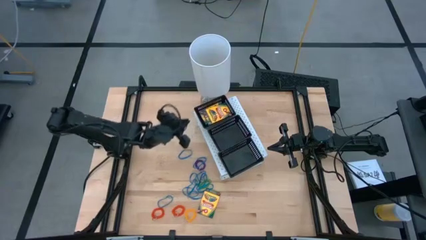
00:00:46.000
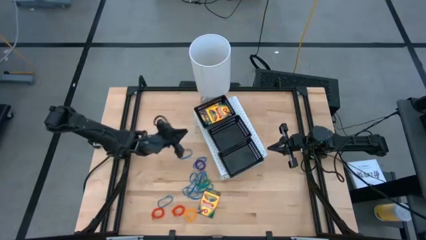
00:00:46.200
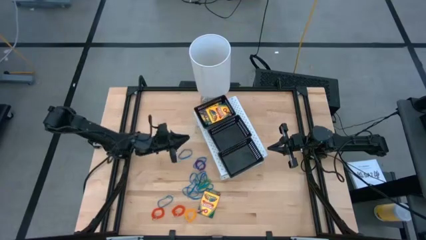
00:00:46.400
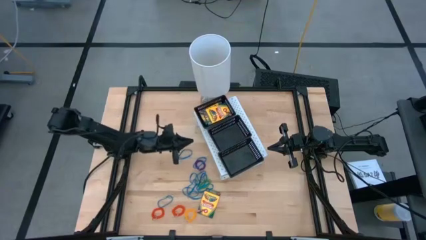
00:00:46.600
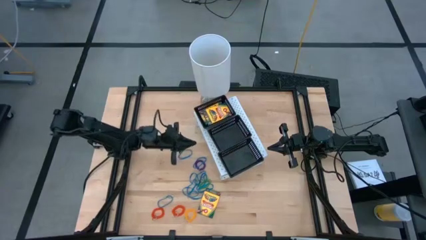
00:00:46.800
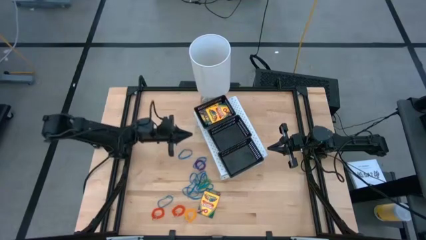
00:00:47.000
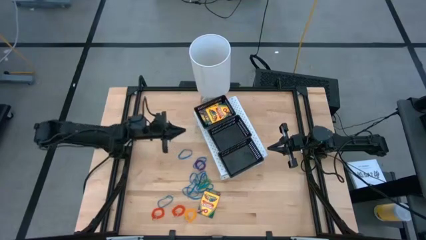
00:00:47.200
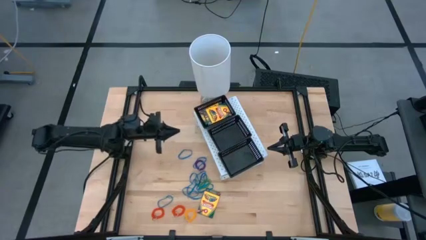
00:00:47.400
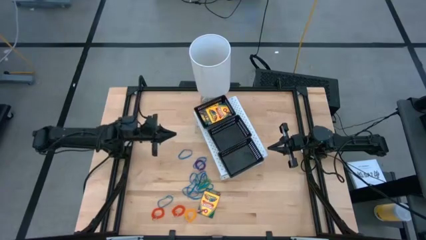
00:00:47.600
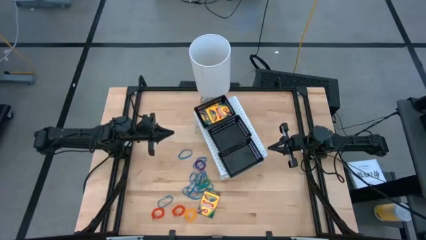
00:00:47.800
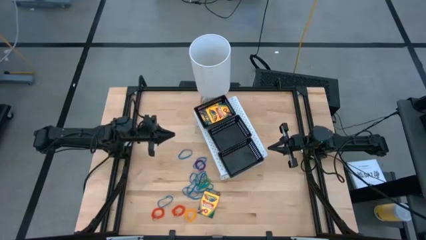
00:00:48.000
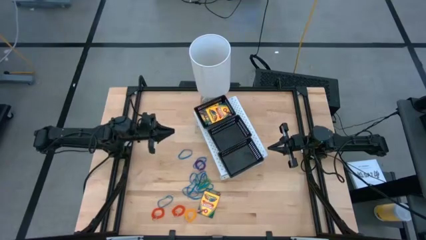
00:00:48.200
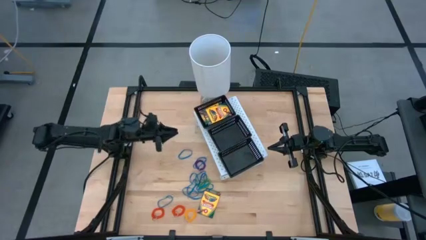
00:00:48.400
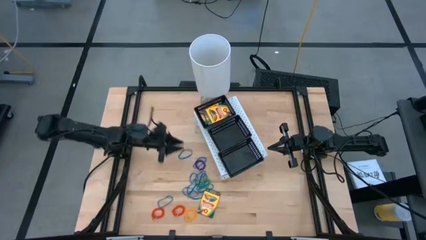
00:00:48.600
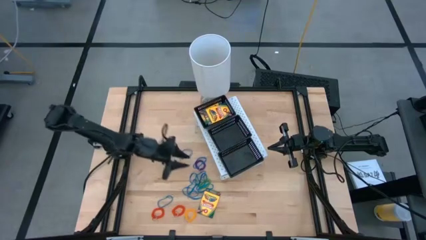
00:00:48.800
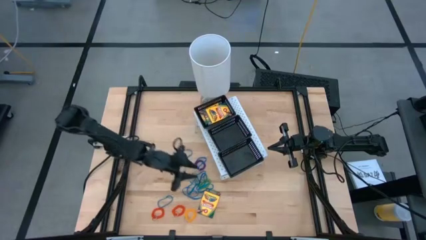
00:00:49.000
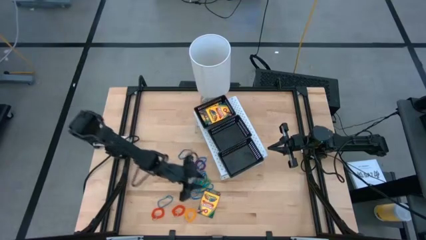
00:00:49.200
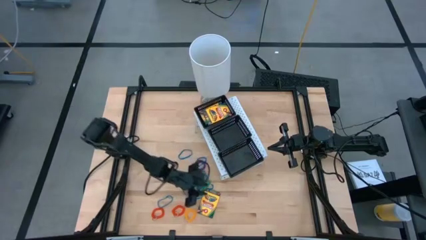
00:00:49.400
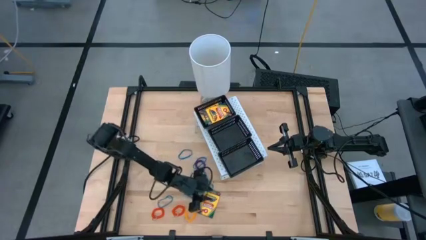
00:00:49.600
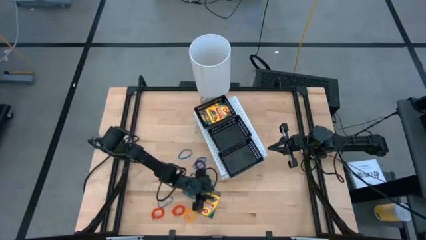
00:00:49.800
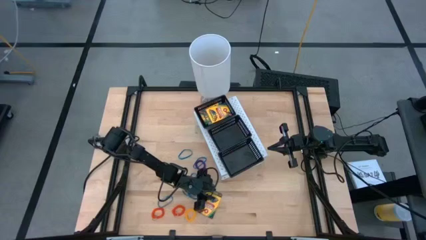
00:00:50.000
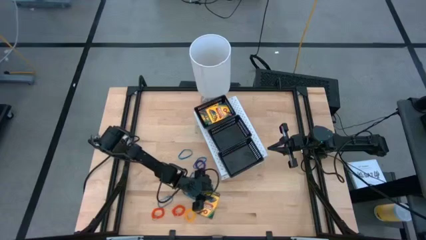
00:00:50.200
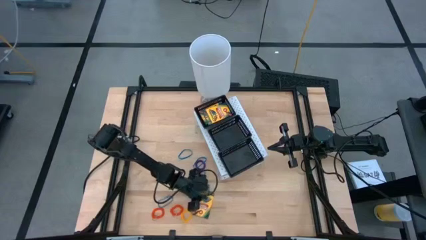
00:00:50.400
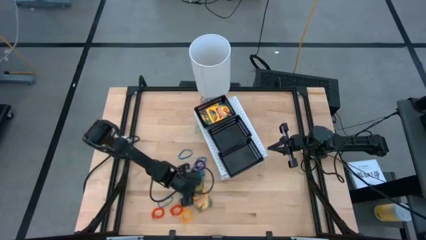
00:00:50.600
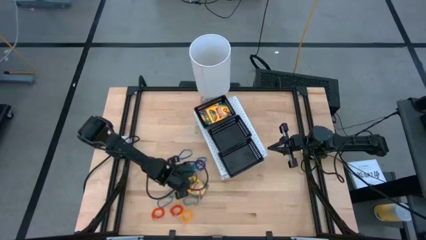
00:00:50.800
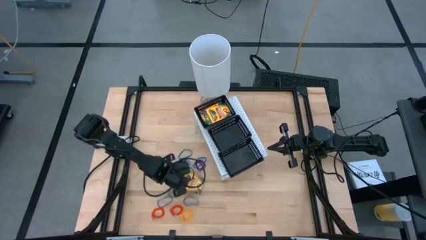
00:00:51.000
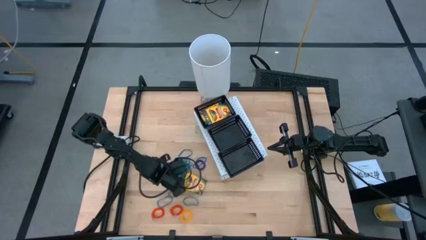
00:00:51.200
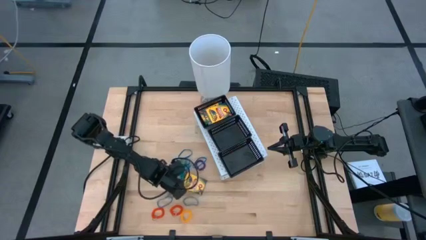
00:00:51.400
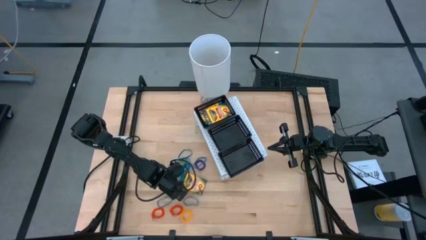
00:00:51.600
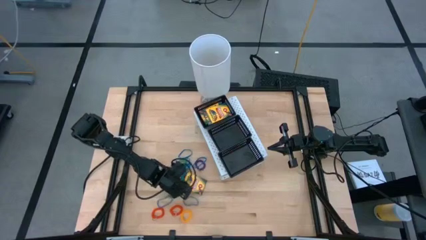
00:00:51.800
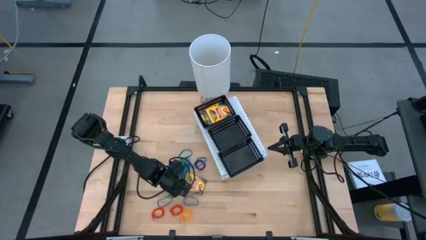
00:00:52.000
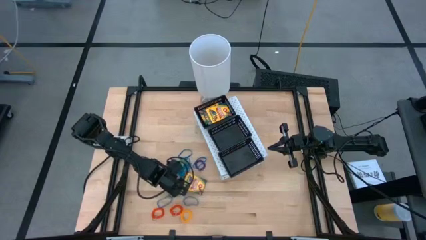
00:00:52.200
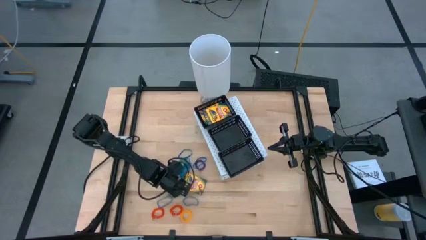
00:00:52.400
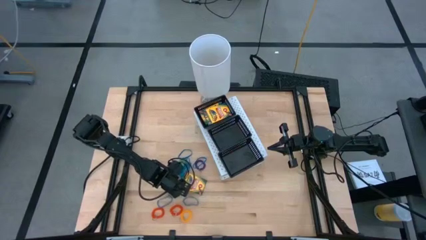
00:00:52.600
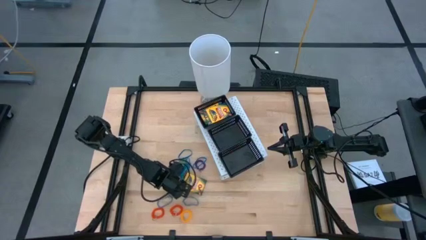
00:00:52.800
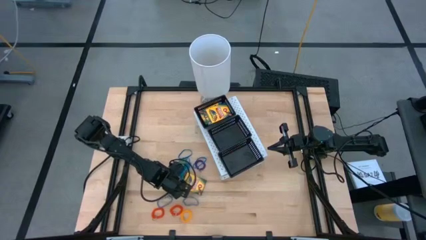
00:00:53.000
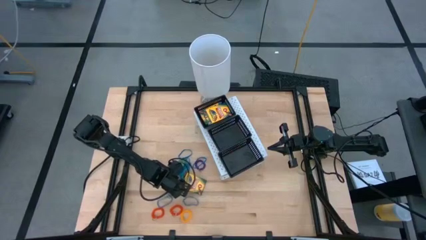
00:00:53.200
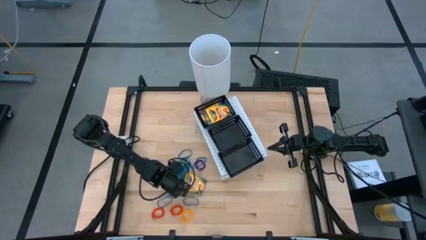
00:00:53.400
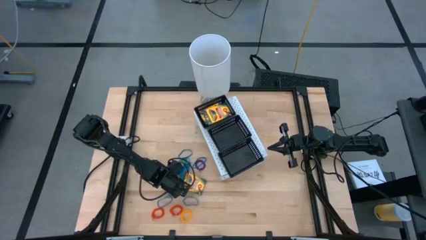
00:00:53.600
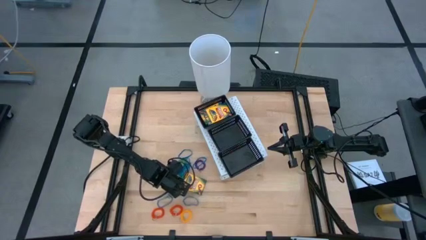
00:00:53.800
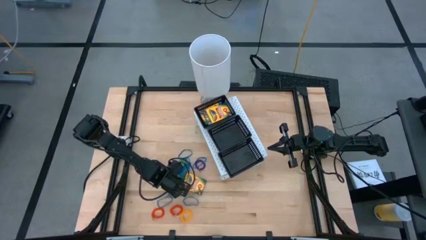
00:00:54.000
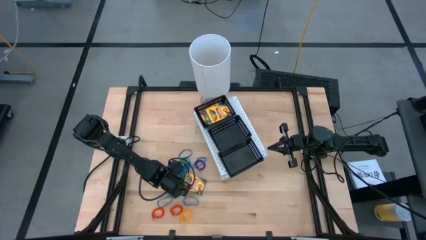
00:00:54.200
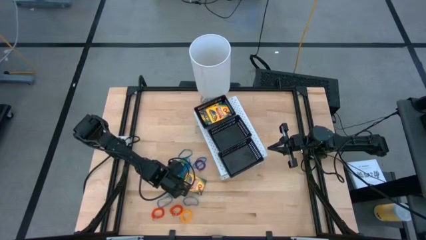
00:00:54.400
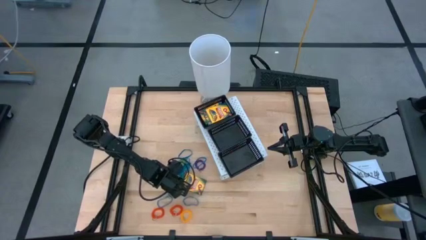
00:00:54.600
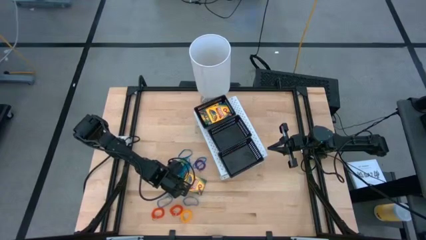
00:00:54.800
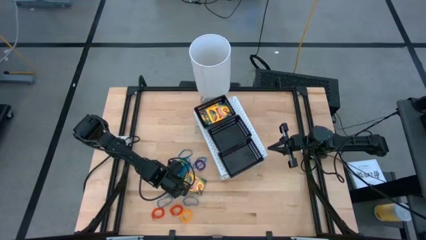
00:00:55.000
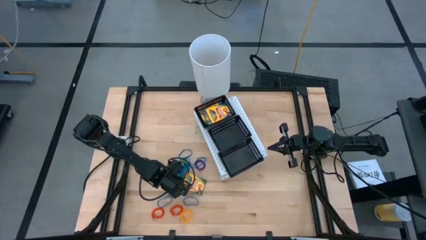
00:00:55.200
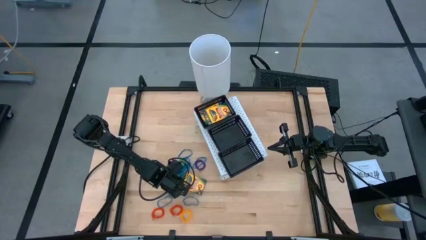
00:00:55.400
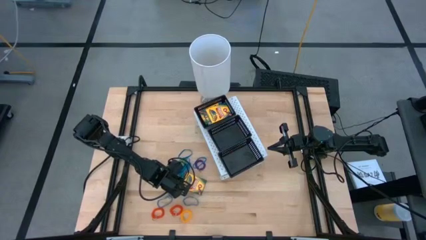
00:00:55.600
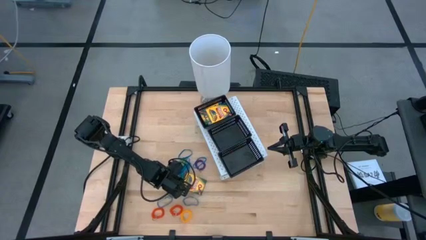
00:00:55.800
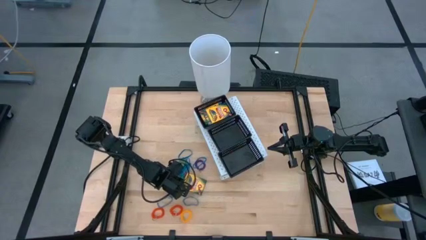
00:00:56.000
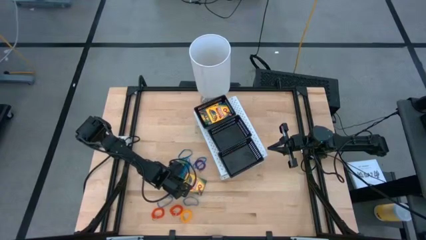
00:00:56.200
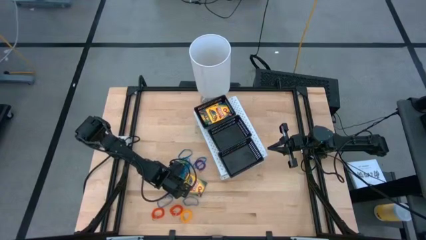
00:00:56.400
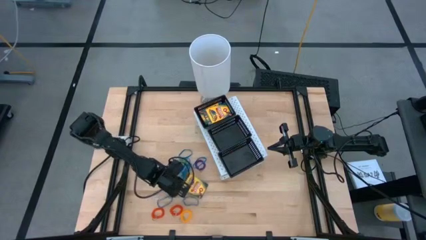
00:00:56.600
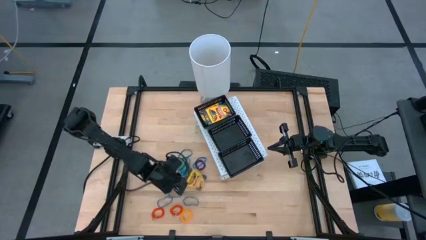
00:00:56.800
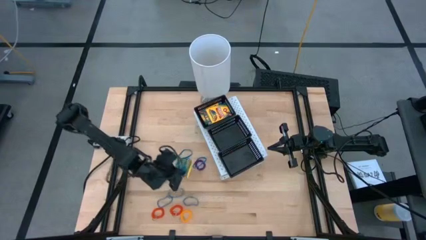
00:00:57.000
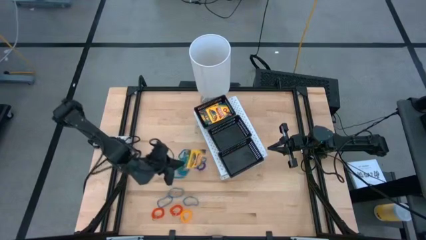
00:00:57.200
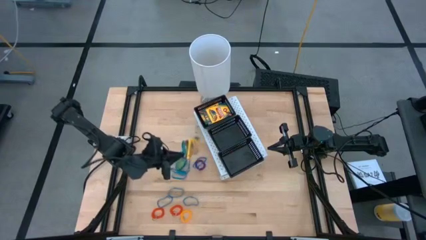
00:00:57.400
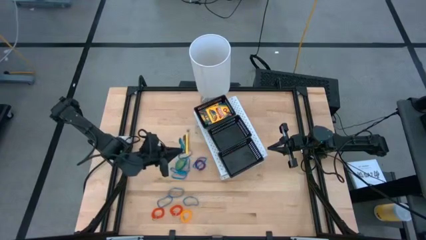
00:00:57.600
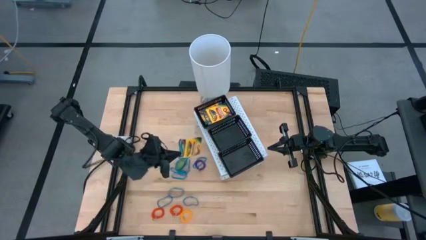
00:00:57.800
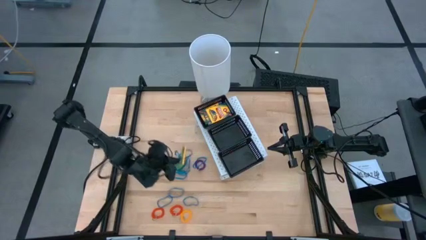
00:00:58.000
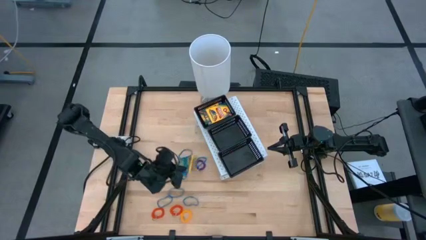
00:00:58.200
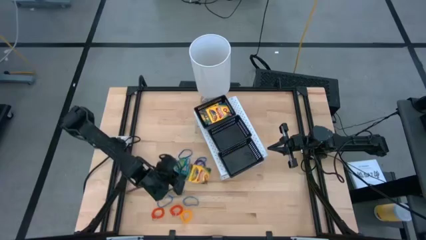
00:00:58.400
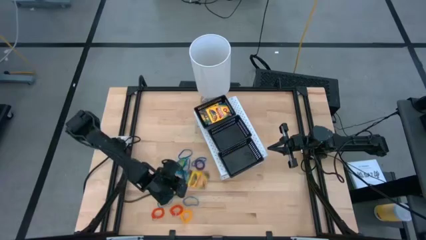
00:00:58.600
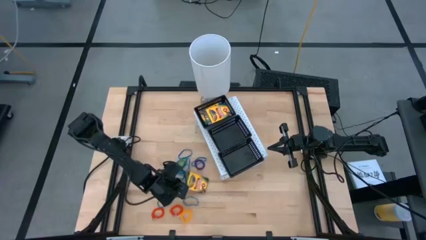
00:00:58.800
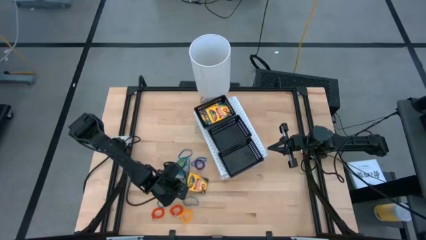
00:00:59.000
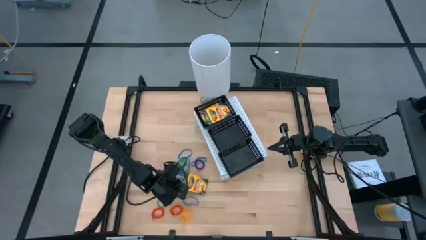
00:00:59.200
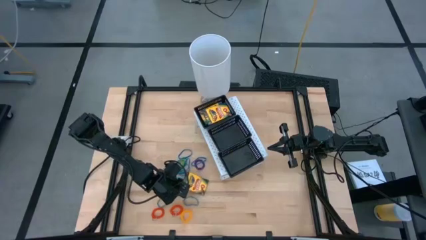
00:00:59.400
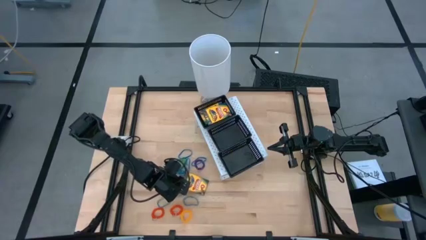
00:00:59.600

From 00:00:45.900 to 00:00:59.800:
Task: Pick & Place Office Desk Supplies
Put the crayon box into the top black bin on the shelf
